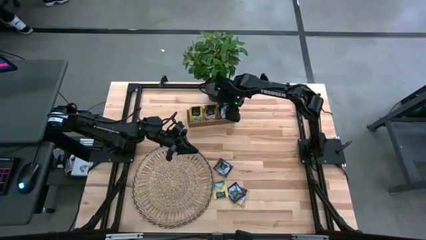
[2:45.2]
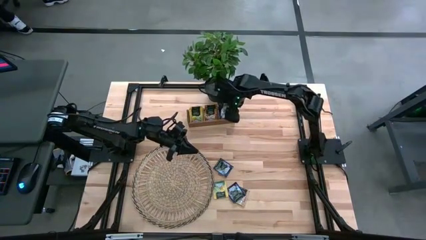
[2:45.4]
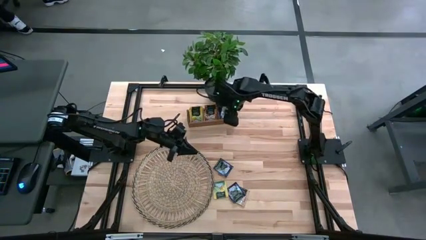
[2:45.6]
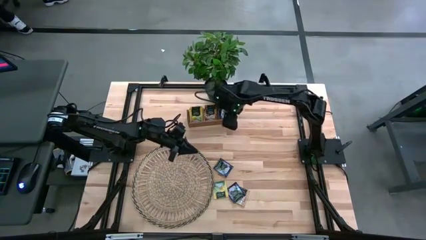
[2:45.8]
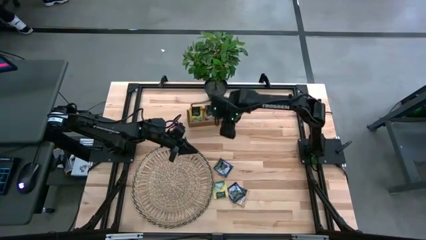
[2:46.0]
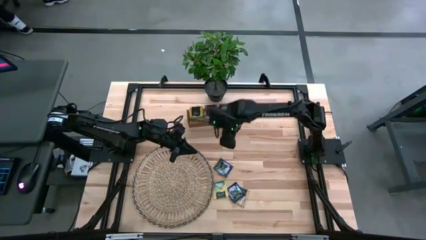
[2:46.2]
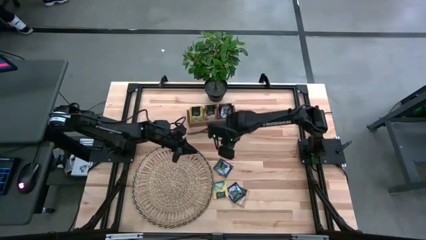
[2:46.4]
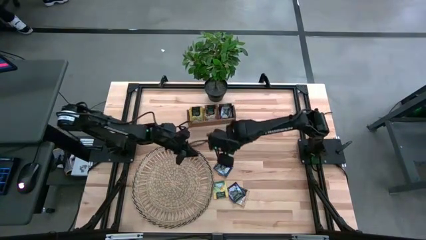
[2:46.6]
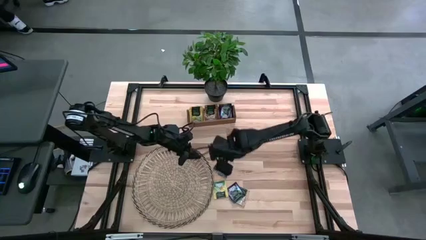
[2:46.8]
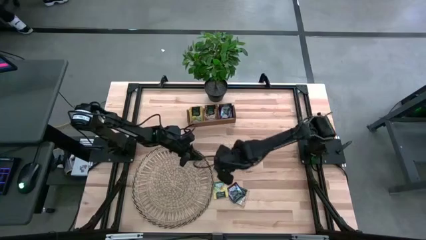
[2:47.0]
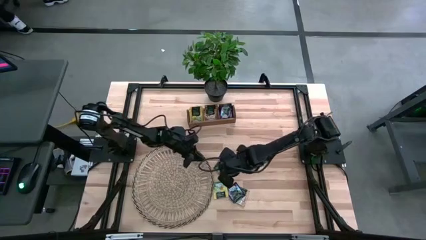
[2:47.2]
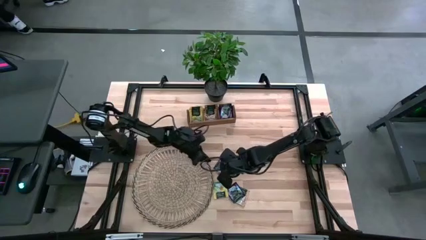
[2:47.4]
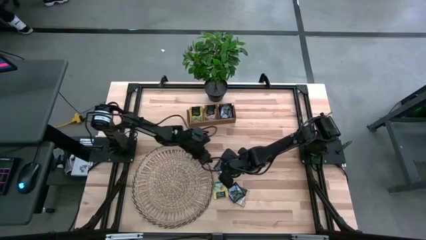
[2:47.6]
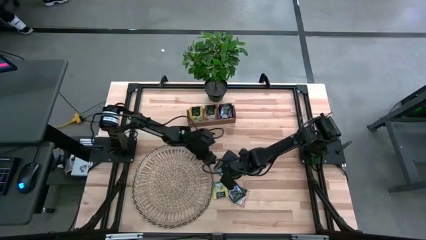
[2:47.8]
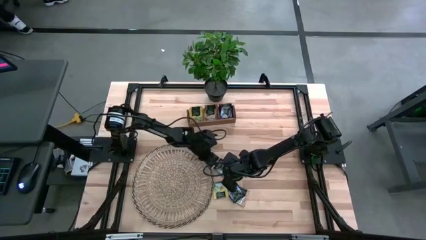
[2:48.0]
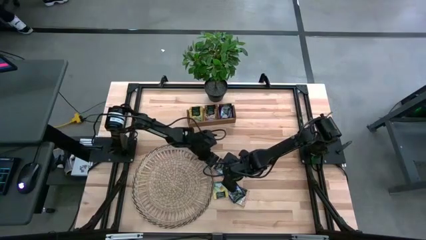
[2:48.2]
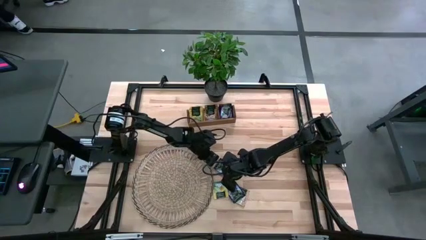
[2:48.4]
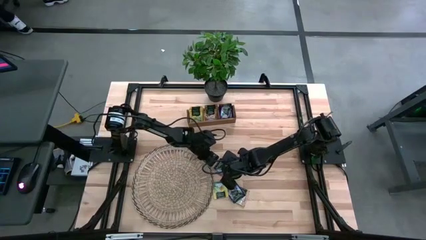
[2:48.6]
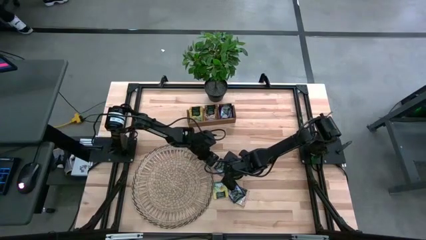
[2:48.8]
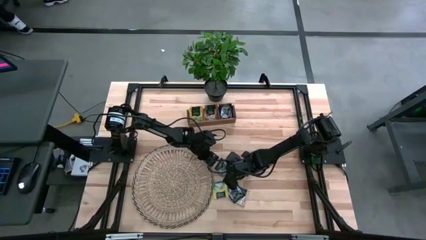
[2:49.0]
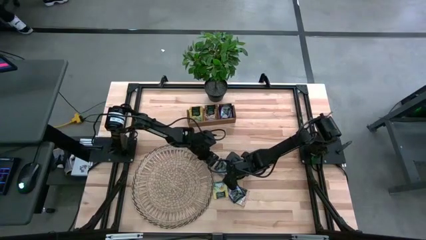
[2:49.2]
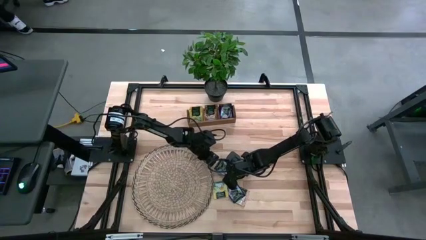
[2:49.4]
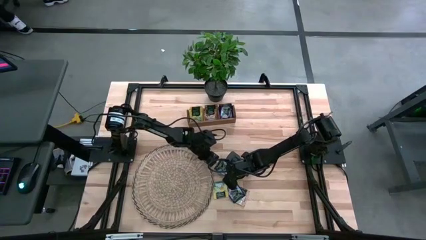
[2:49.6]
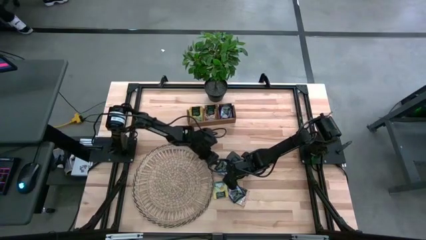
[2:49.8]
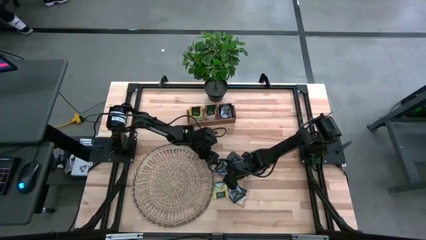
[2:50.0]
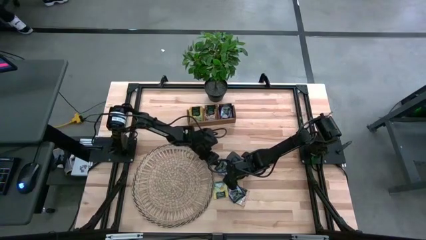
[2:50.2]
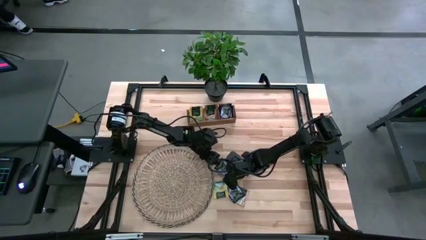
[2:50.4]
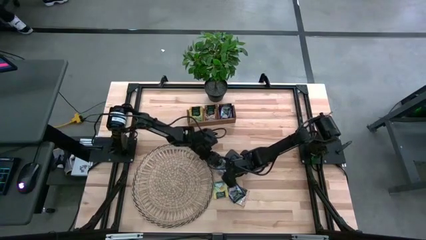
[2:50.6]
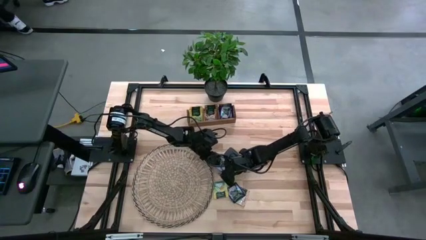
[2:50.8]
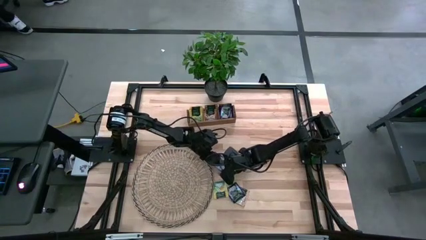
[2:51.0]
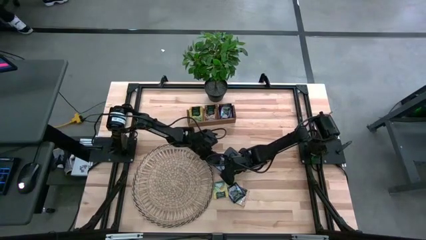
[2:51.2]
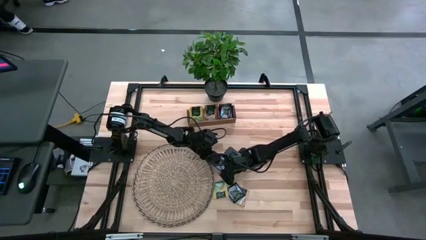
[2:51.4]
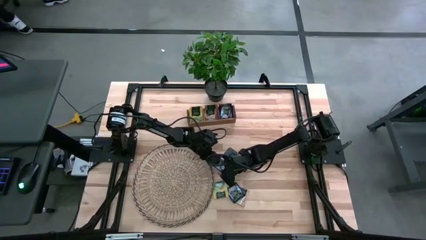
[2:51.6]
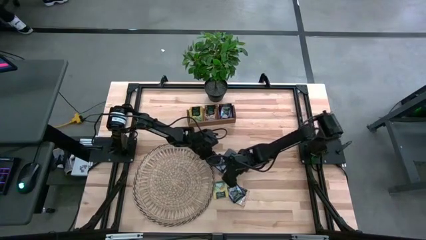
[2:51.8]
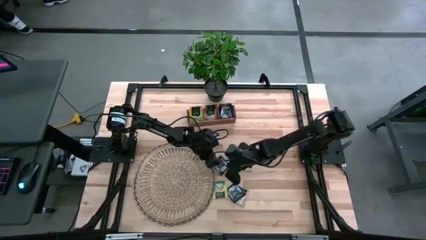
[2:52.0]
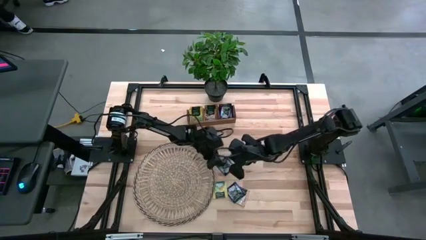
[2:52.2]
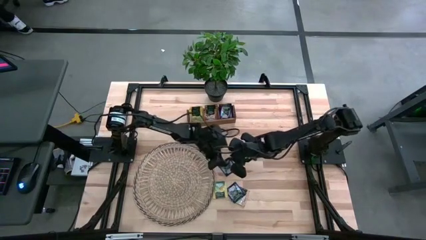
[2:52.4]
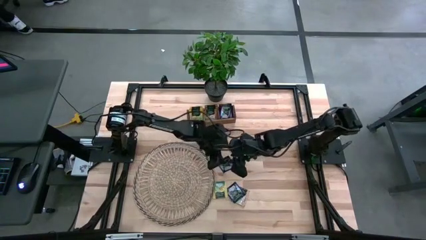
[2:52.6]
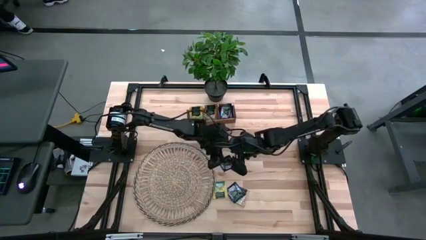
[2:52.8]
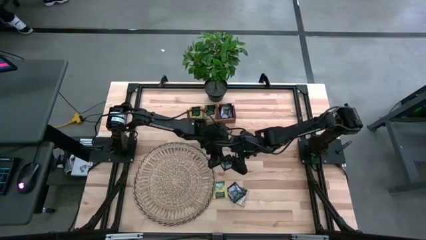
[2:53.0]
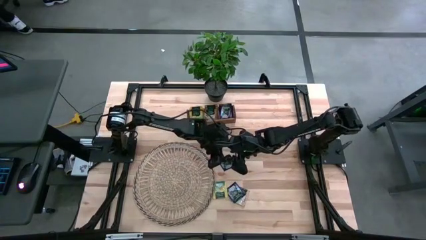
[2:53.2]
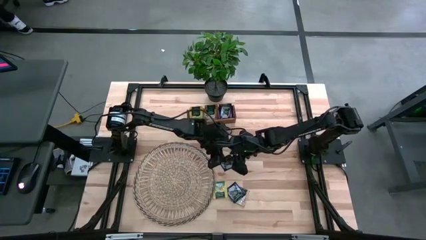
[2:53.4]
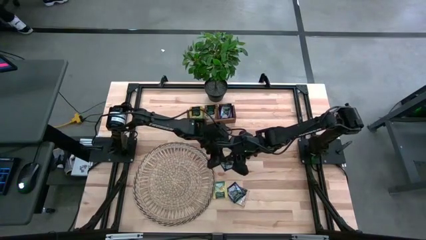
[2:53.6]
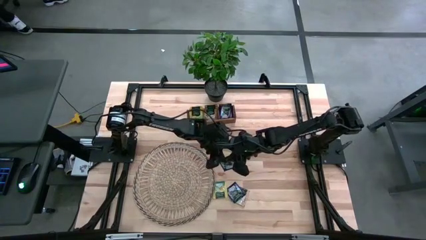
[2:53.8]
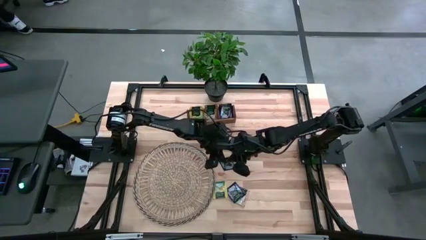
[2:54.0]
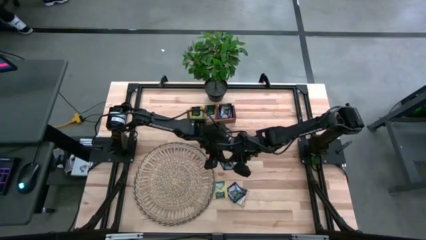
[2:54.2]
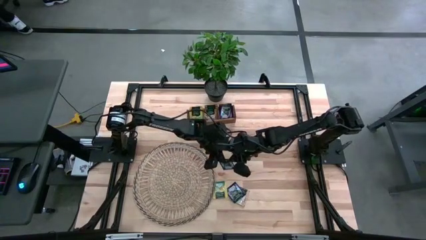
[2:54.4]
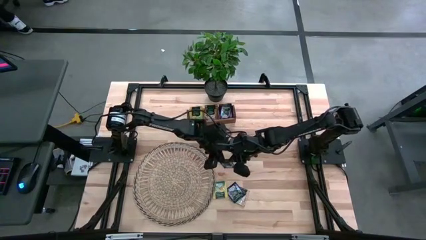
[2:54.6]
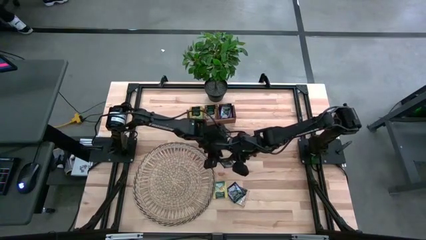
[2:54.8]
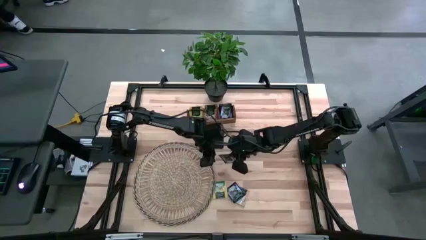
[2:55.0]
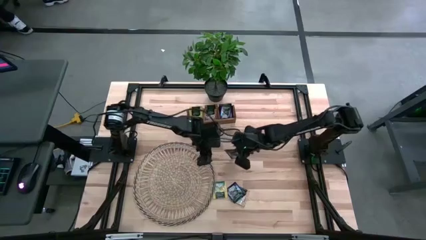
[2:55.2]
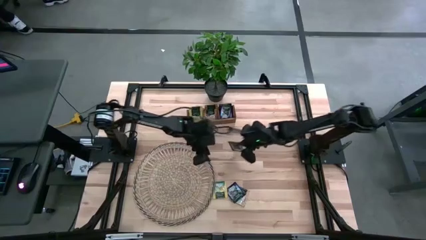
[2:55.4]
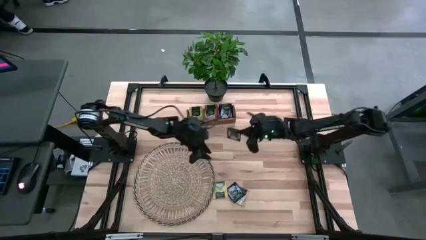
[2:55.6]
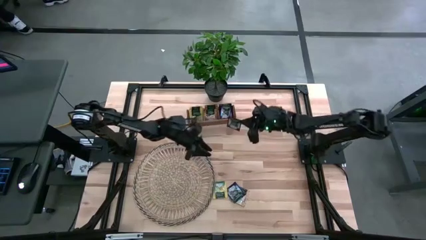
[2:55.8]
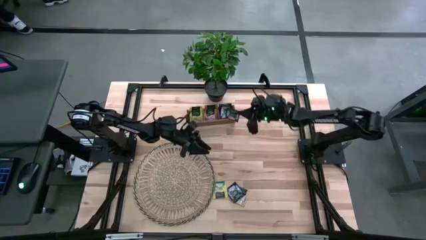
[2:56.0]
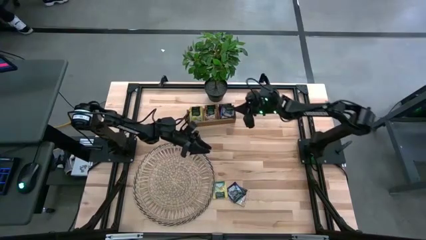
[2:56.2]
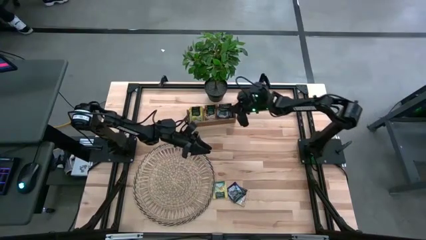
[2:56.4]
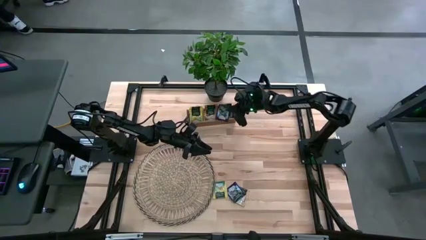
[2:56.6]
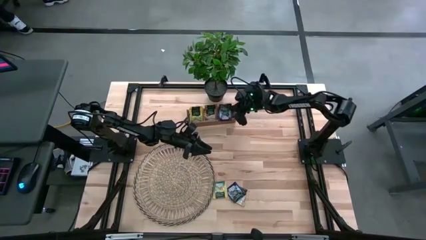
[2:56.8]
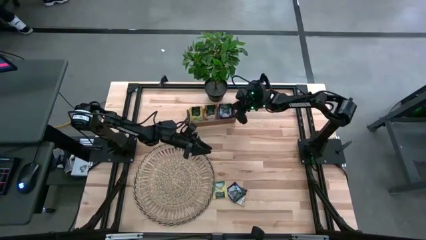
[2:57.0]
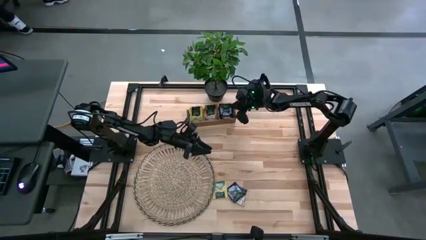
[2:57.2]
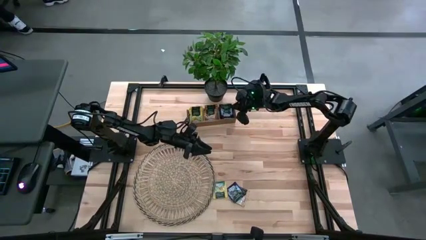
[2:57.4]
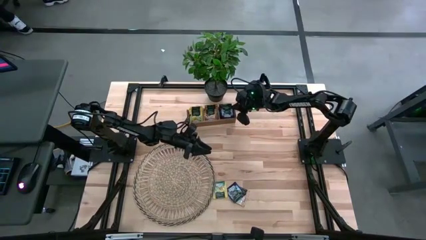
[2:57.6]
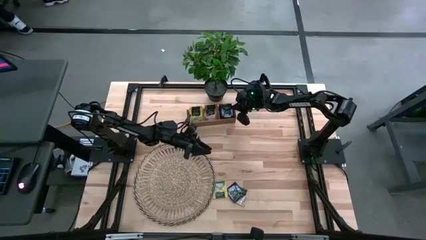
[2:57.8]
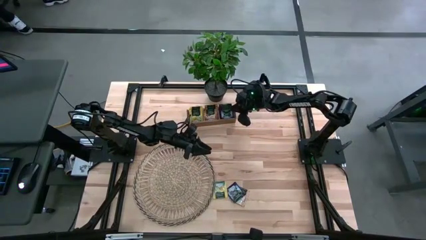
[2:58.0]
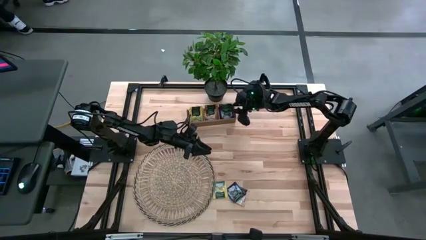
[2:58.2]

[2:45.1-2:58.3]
Task: Pick & Place Tea
Put the blue tea bag into the right section of the wooden organizer

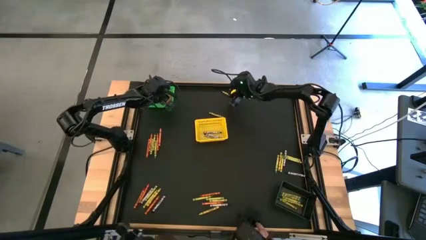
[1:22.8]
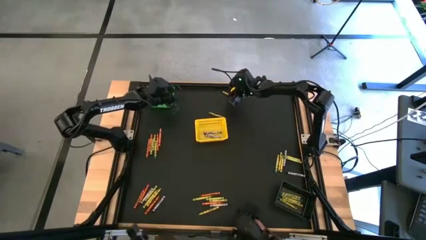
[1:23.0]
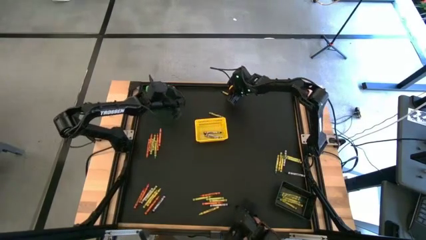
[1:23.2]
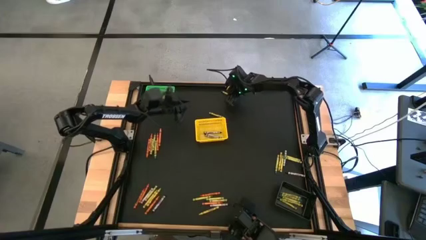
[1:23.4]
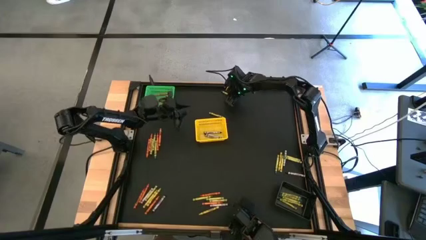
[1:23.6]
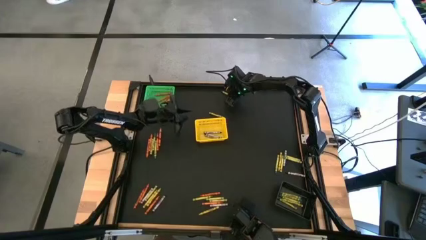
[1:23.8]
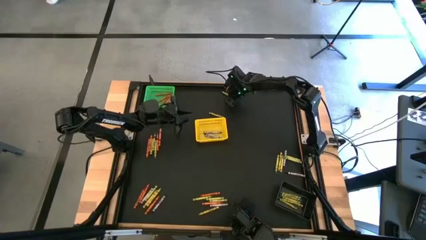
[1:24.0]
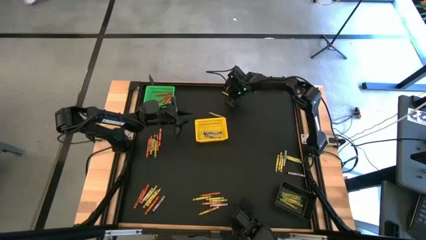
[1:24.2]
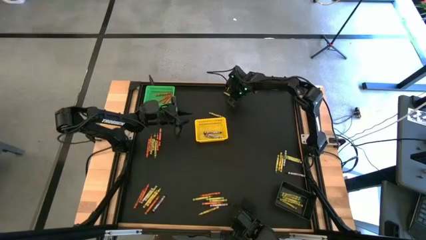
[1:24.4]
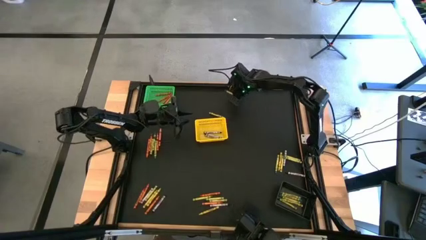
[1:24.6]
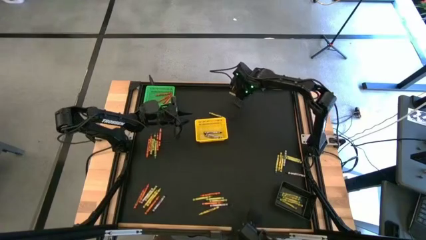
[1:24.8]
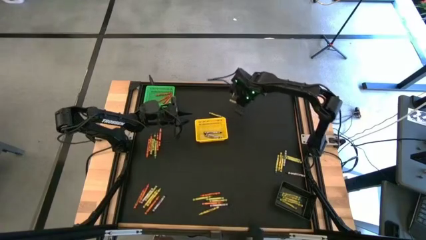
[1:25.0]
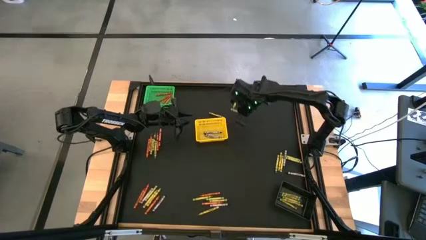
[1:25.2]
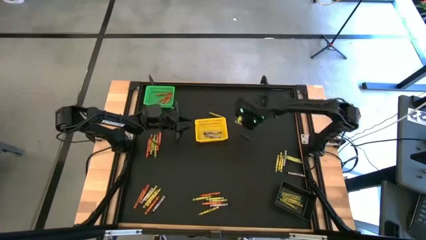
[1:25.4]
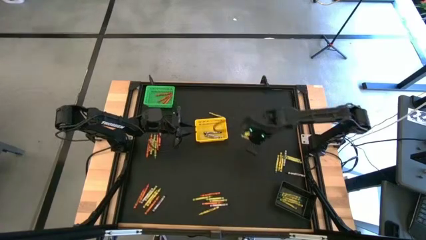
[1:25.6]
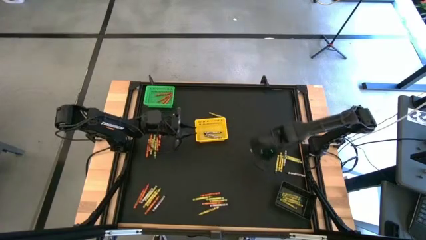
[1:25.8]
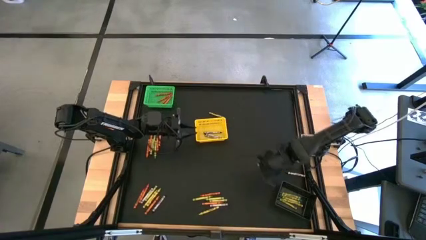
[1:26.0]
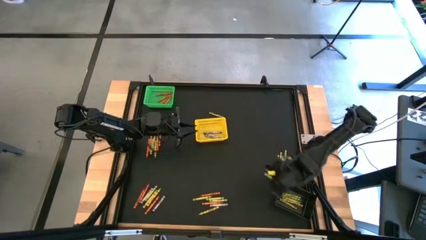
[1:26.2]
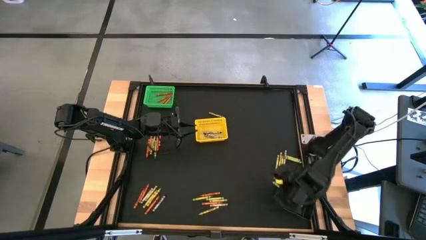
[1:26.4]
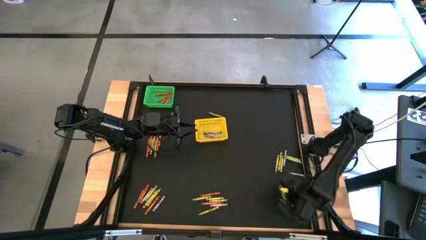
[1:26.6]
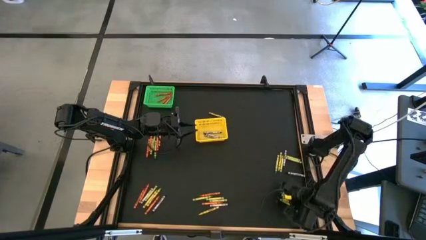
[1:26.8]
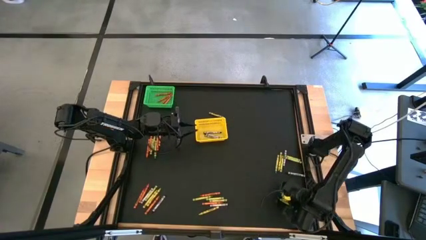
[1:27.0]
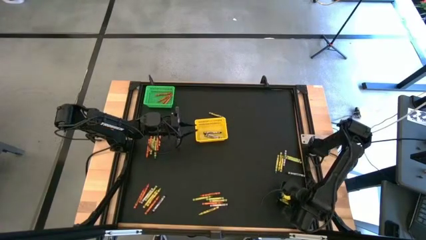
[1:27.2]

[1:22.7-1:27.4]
Task: Sort crayons
Put the green crayon into the black bin
